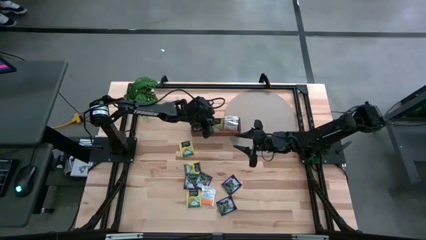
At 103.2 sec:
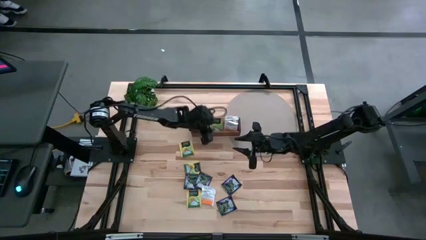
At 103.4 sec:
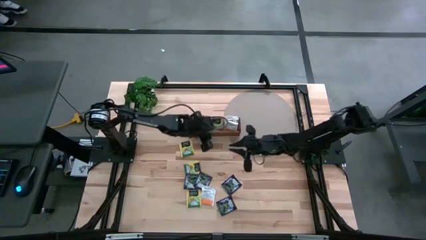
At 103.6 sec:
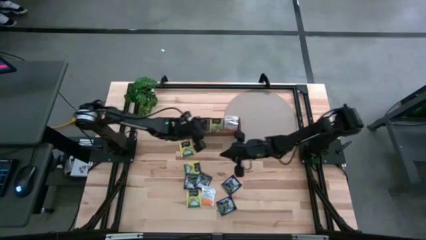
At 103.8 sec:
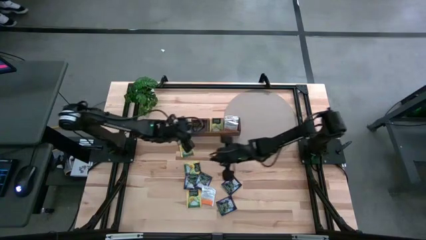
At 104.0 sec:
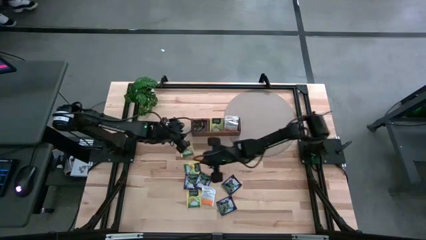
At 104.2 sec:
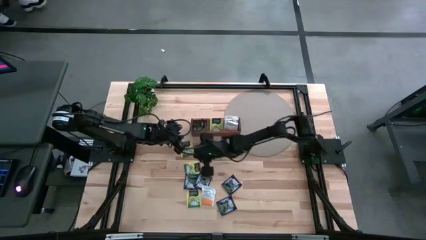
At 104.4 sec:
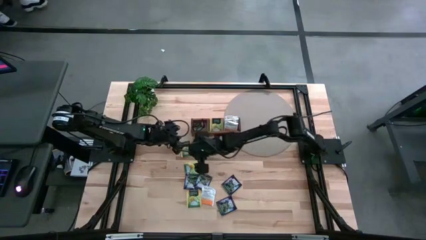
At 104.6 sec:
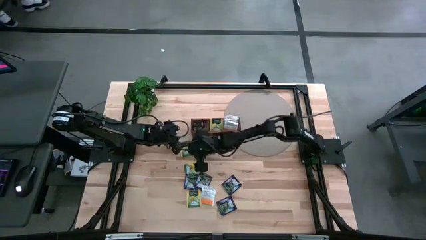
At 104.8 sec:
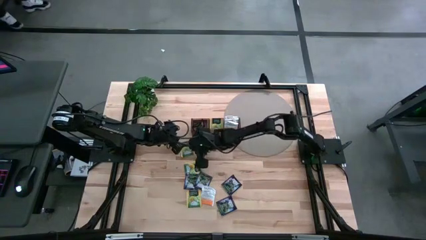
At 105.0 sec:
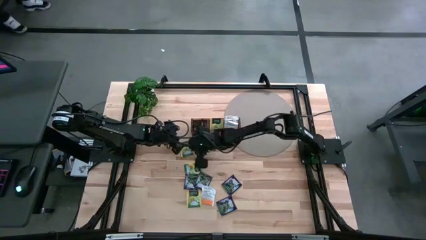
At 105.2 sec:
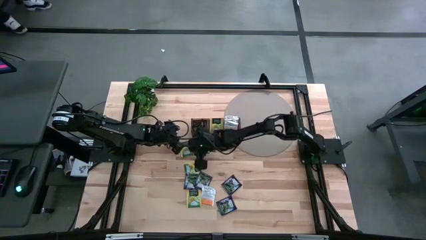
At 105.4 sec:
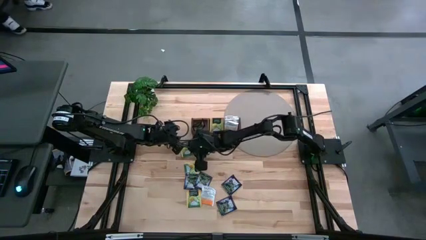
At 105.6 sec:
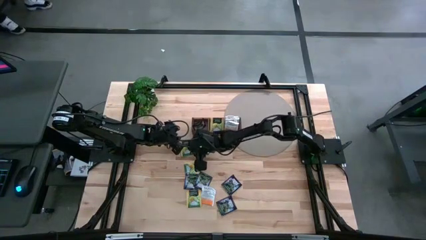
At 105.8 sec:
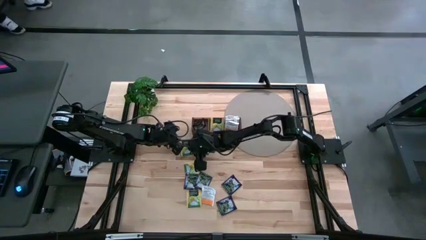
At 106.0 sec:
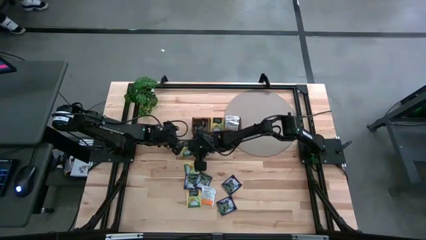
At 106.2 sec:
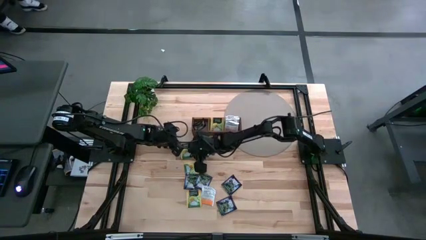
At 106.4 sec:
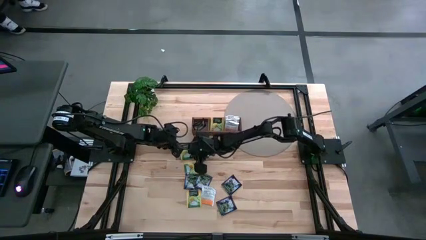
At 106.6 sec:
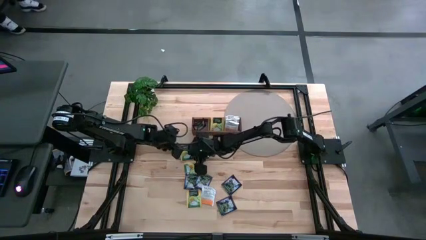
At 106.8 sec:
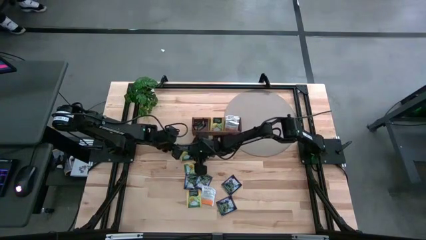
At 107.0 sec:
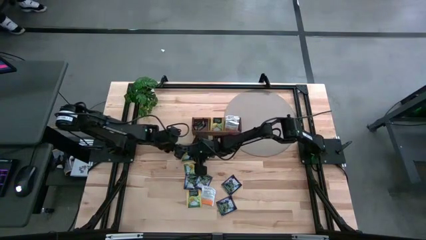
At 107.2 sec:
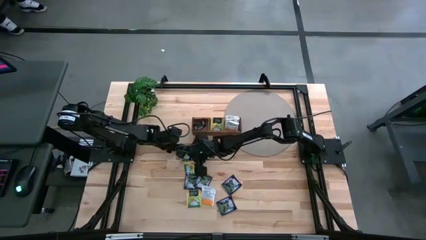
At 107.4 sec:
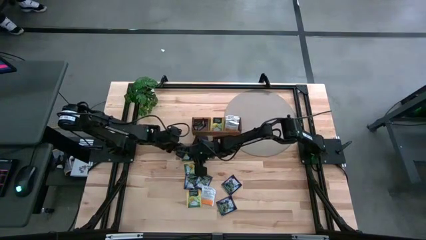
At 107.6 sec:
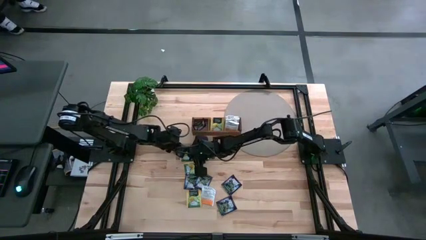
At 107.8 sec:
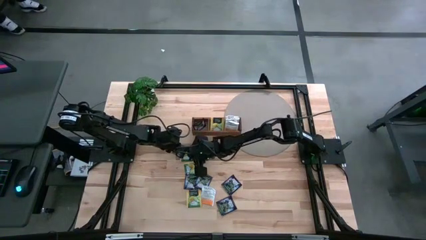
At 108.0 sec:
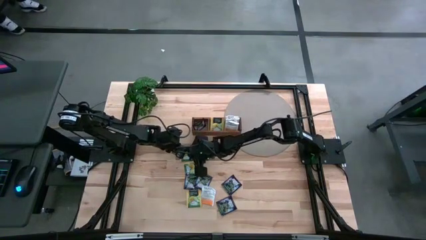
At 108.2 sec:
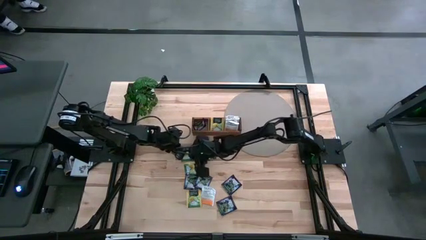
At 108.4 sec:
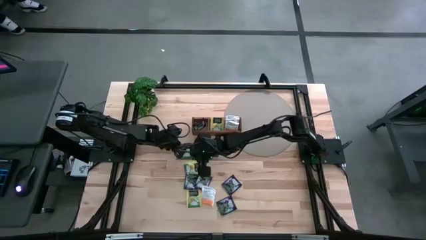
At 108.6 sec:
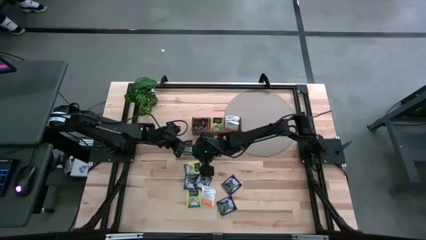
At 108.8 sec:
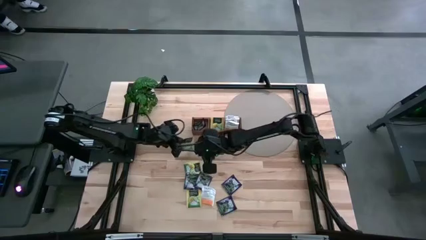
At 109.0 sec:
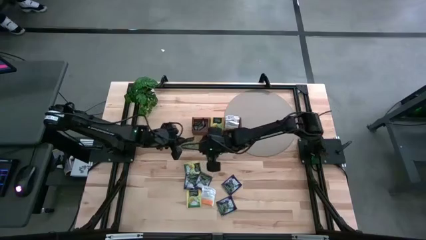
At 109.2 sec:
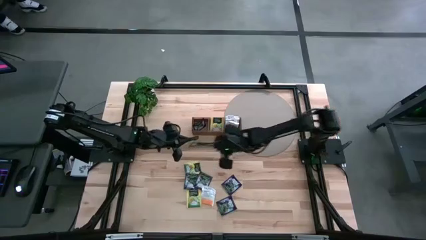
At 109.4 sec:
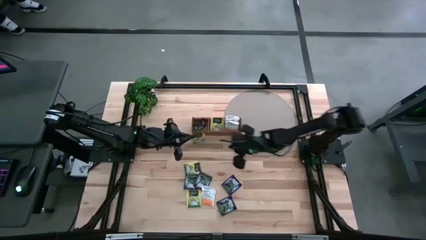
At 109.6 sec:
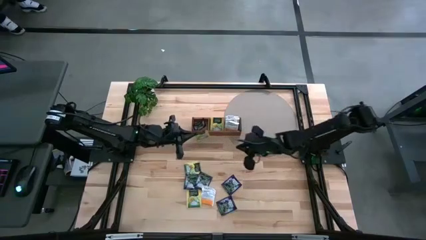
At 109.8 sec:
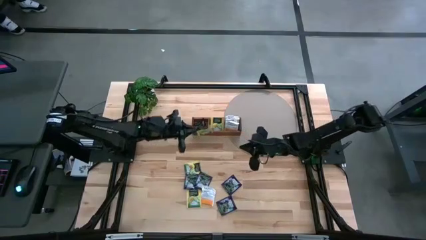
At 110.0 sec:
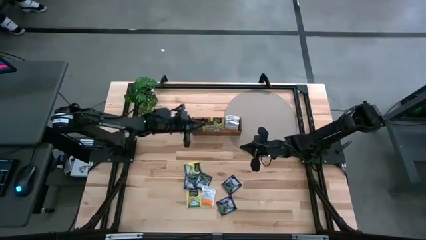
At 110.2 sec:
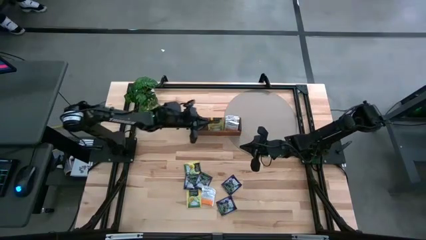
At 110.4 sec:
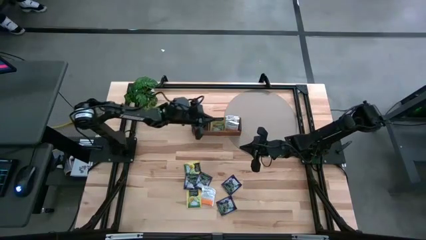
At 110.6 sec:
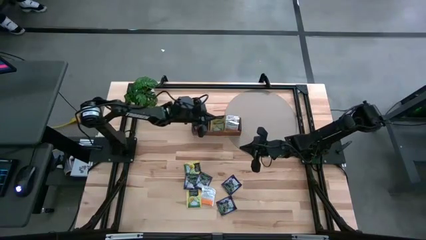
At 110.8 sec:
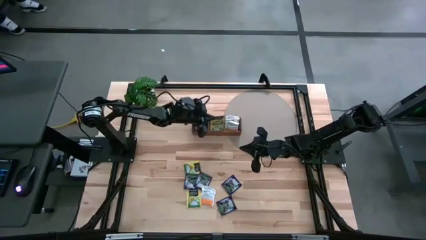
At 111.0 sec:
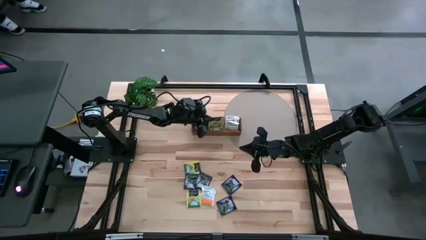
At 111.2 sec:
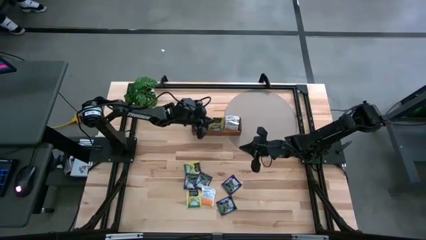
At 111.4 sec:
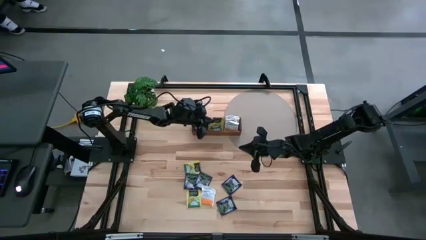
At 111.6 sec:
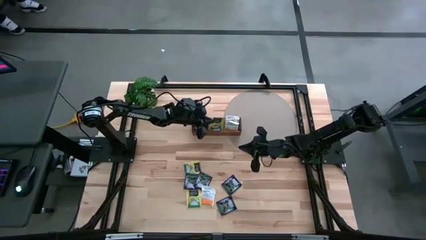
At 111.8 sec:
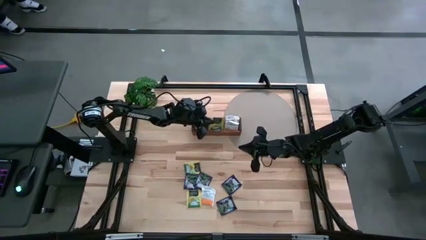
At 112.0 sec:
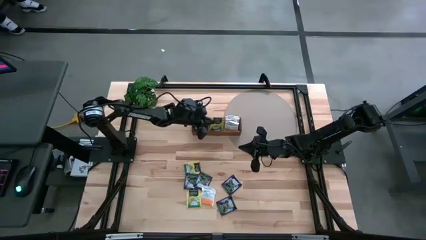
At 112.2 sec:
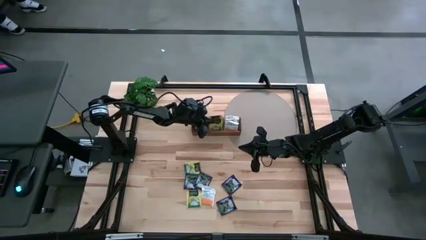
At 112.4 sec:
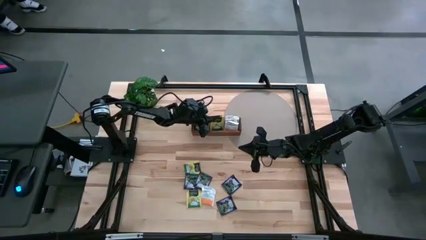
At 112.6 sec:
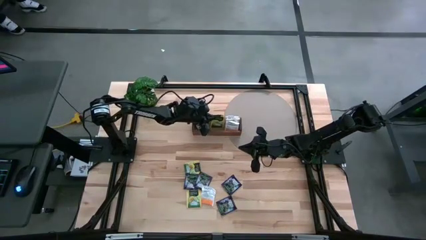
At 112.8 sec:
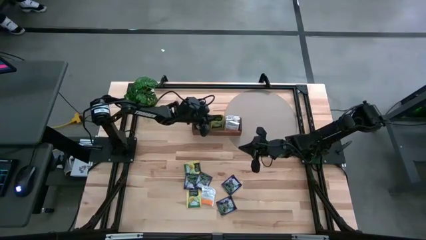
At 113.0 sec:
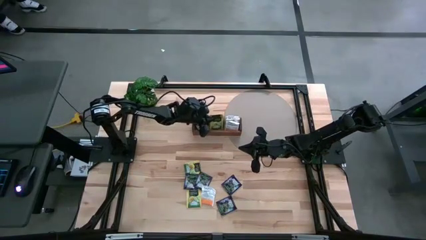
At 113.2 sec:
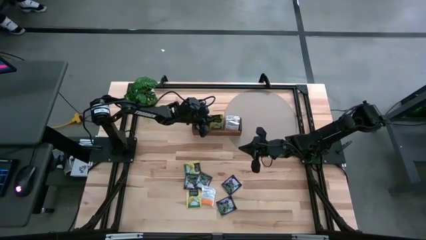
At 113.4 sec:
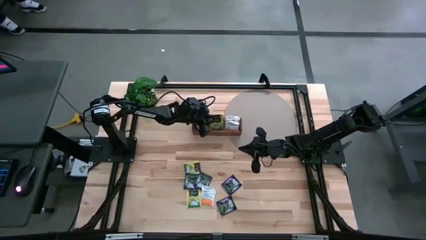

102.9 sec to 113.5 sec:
Task: Pick & Place Tea
Put the yellow tea bag into the middle section of the wooden organizer
